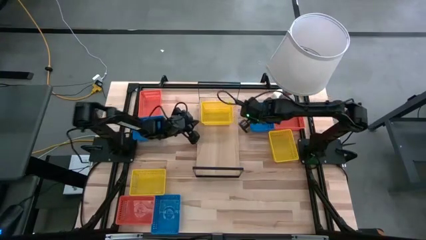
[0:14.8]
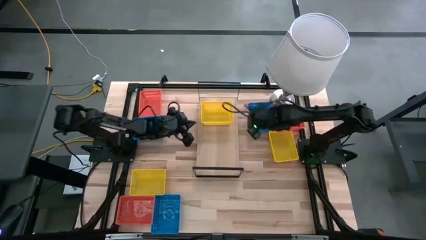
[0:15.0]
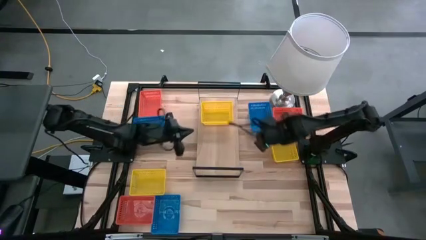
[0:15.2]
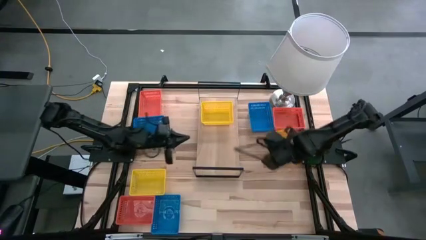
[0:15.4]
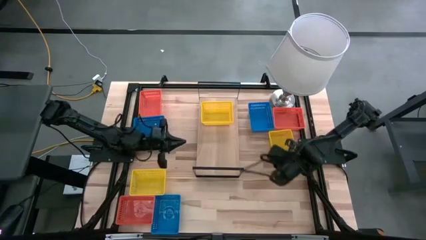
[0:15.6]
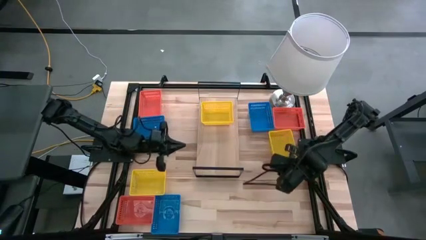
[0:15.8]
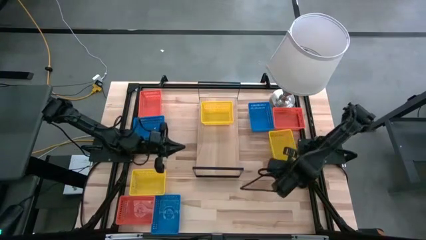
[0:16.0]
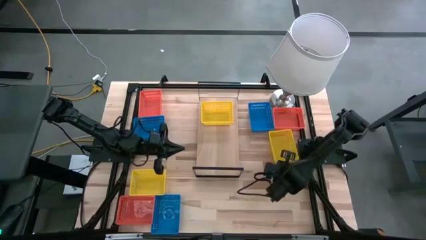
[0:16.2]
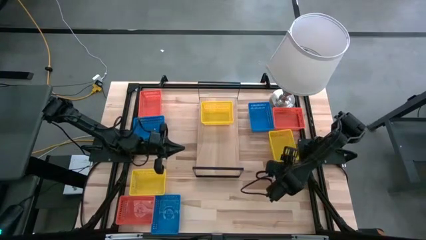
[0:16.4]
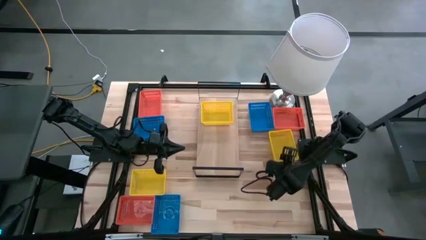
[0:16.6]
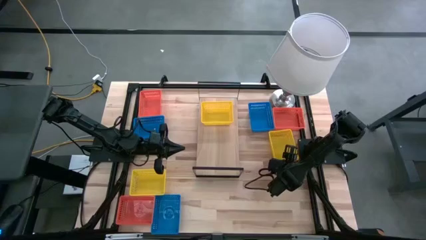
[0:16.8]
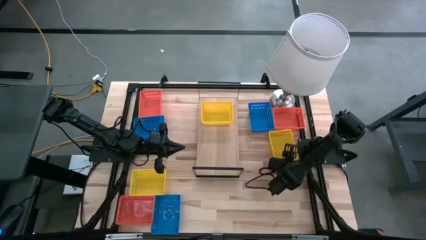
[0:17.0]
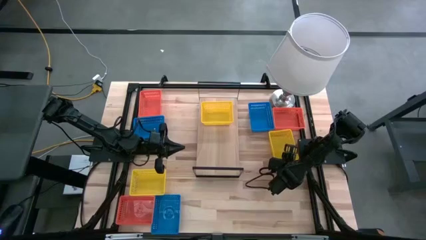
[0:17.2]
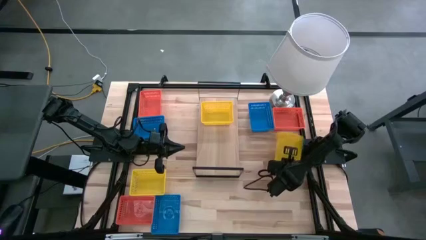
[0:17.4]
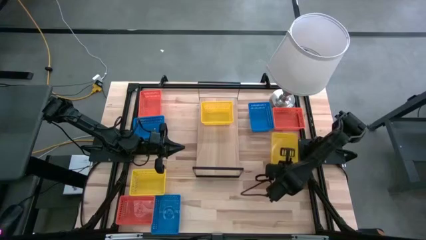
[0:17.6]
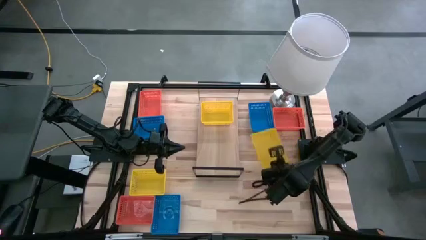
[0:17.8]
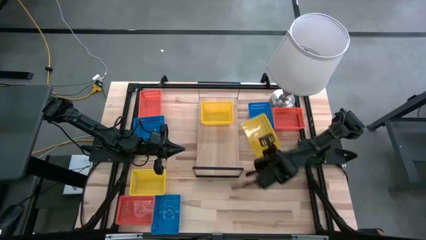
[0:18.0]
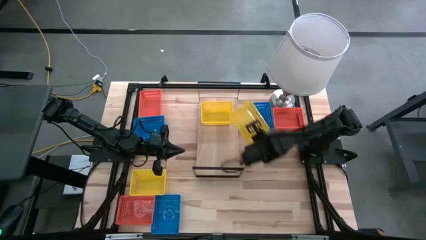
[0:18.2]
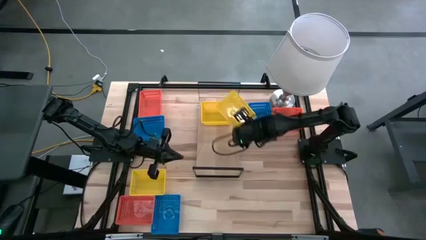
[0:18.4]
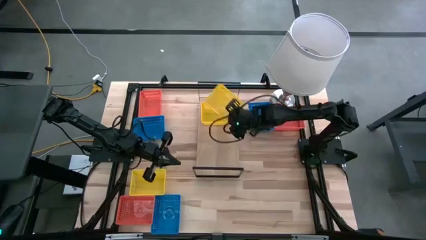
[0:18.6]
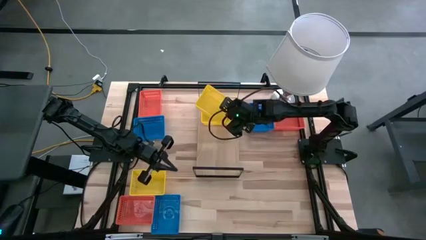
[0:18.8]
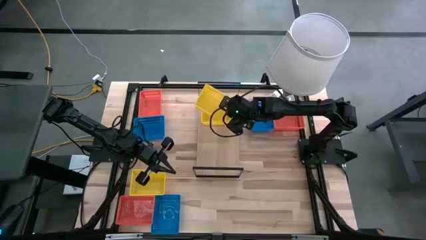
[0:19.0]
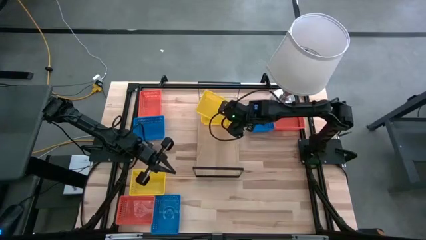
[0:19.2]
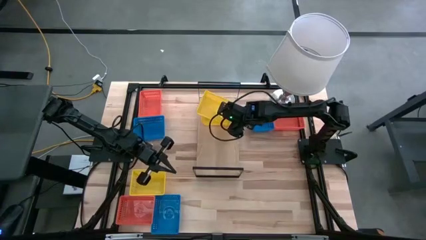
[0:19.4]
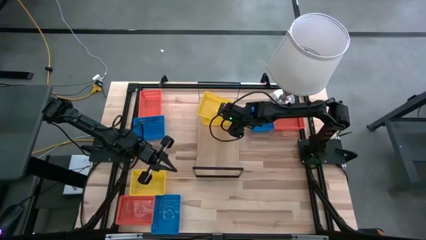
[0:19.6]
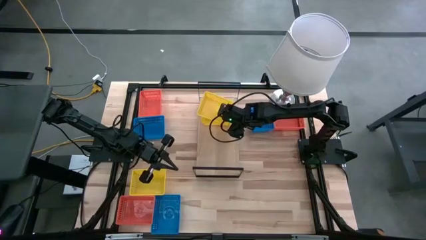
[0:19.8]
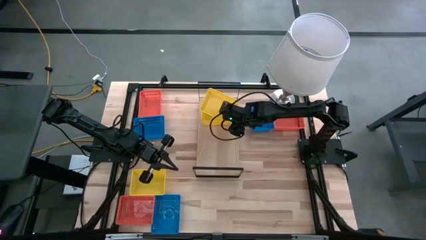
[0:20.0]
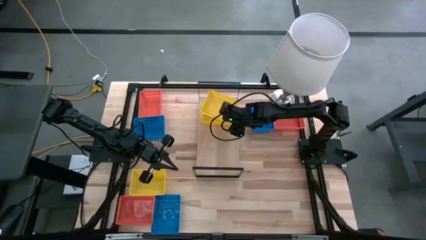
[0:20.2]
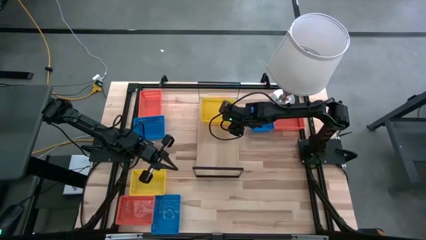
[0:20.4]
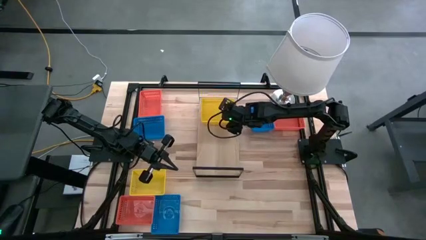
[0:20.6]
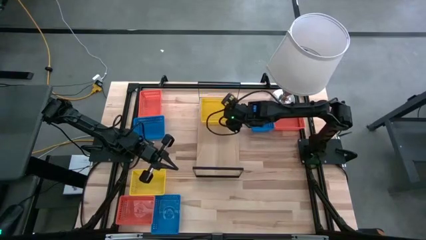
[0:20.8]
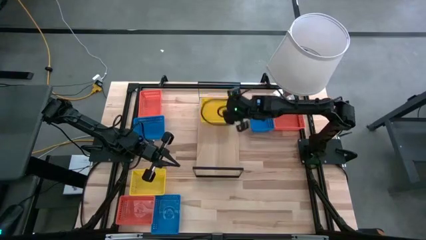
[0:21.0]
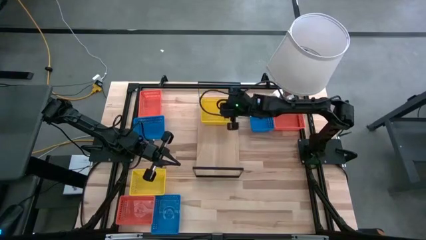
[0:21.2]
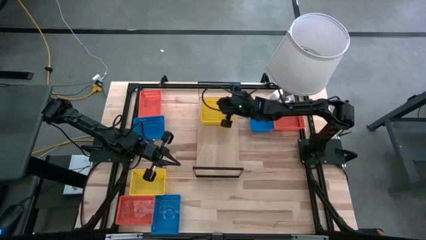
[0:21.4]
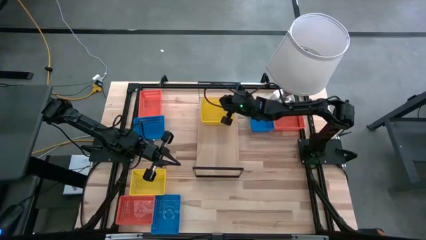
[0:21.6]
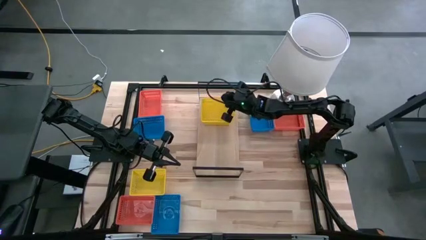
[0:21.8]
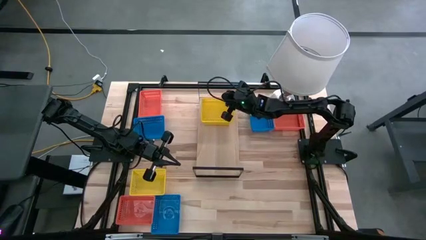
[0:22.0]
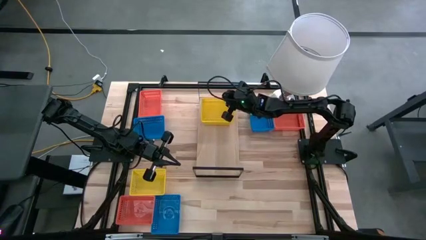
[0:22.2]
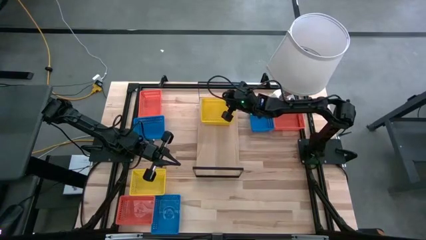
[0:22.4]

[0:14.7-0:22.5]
Task: Stack baskets on shelf by color
Stack the top yellow bin on top of the yellow bin on the shelf

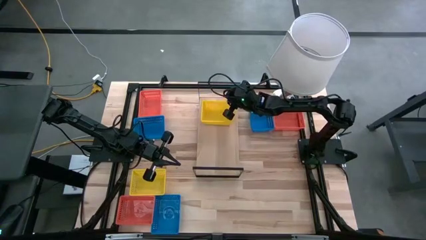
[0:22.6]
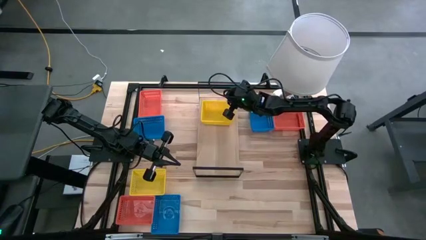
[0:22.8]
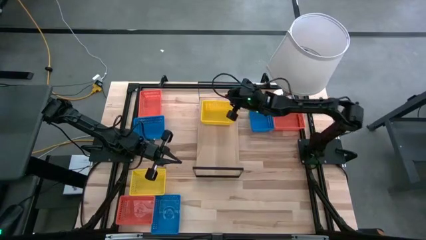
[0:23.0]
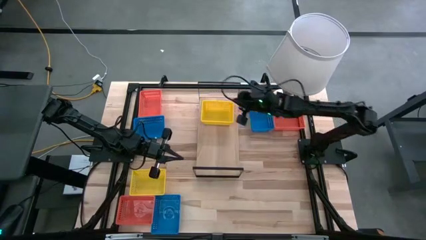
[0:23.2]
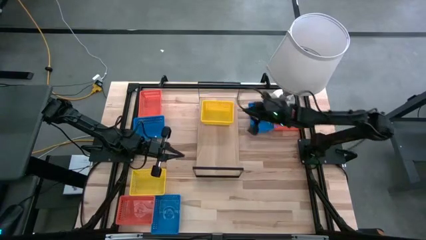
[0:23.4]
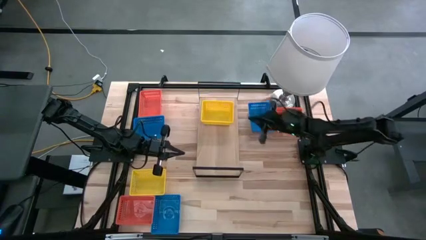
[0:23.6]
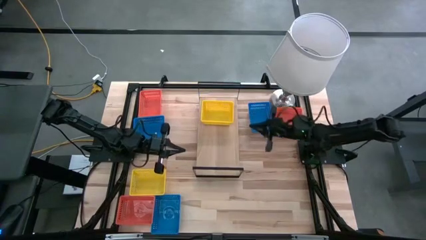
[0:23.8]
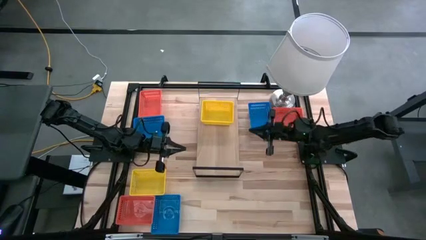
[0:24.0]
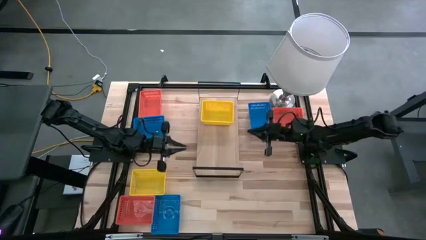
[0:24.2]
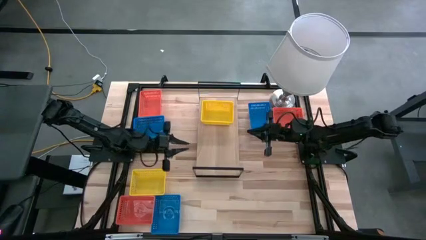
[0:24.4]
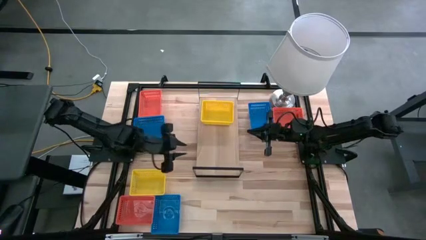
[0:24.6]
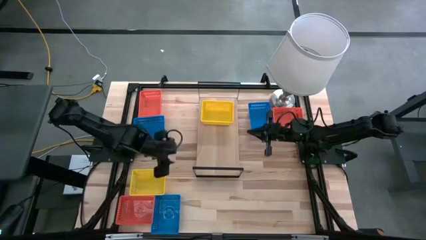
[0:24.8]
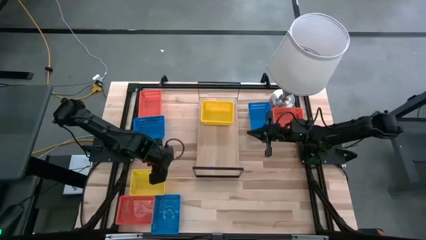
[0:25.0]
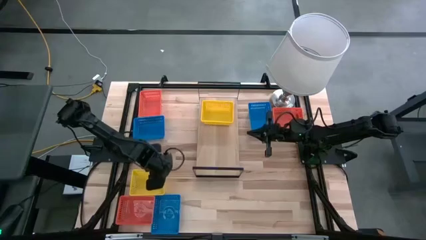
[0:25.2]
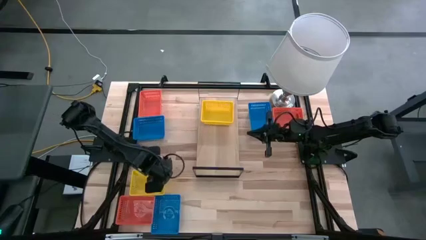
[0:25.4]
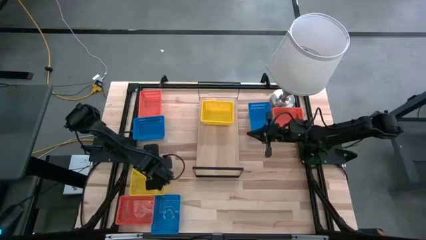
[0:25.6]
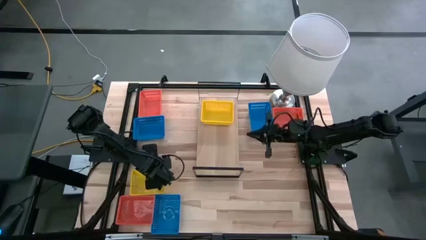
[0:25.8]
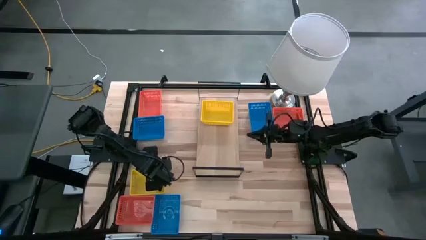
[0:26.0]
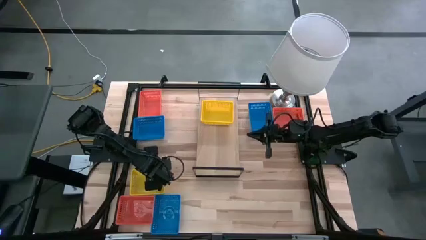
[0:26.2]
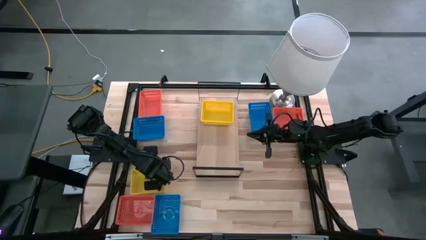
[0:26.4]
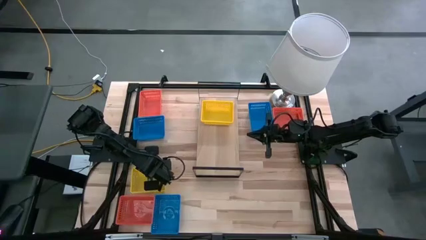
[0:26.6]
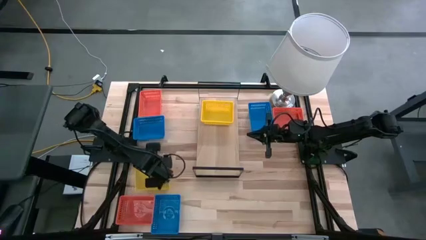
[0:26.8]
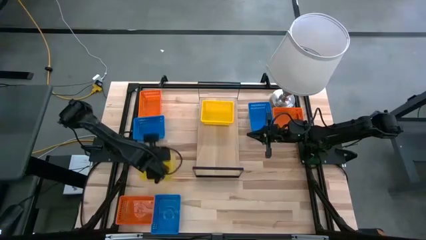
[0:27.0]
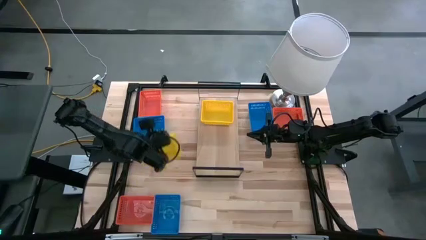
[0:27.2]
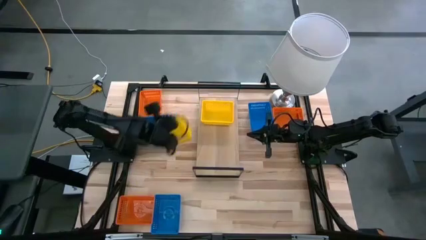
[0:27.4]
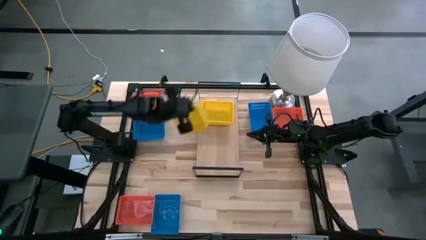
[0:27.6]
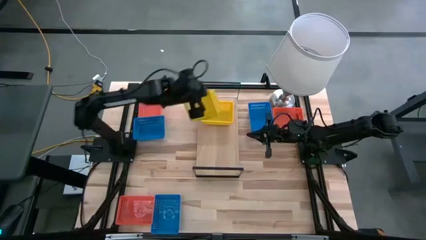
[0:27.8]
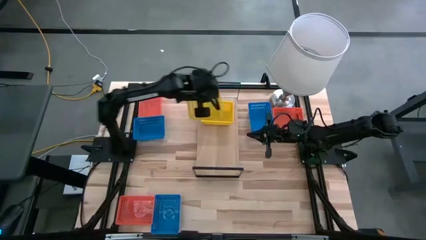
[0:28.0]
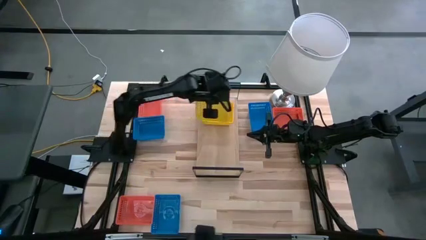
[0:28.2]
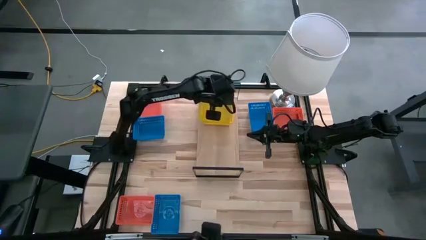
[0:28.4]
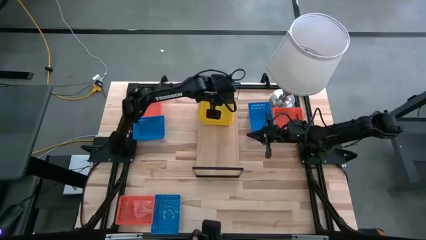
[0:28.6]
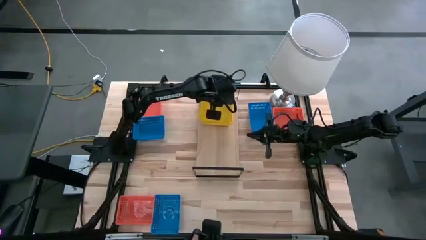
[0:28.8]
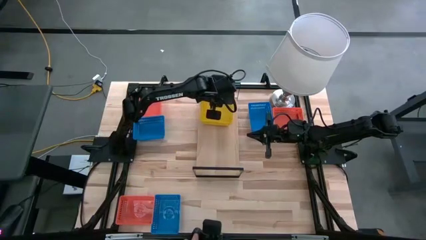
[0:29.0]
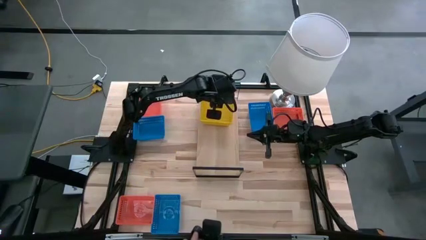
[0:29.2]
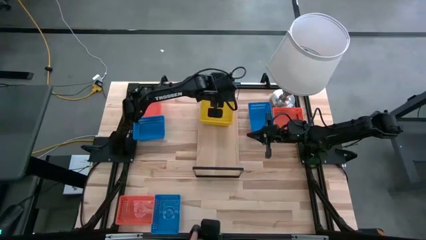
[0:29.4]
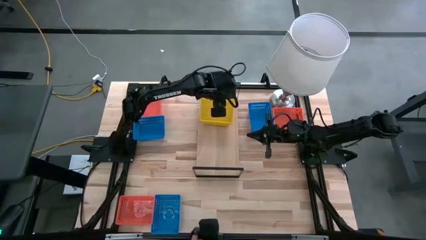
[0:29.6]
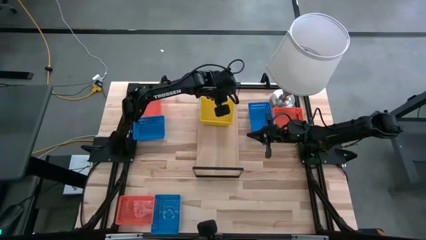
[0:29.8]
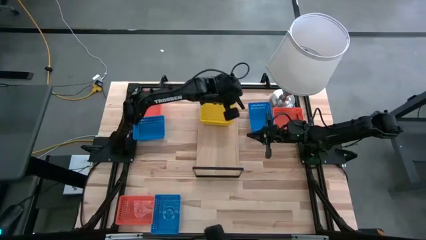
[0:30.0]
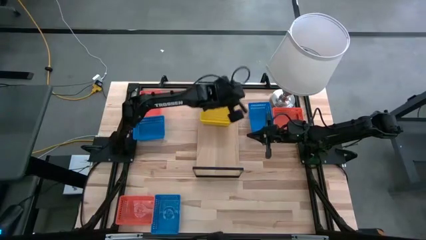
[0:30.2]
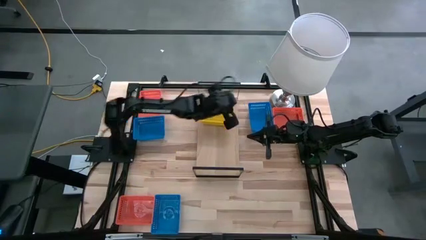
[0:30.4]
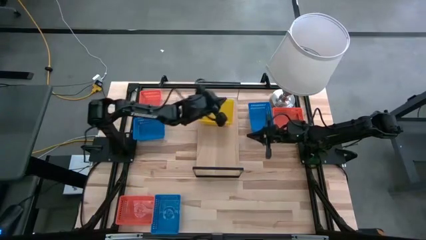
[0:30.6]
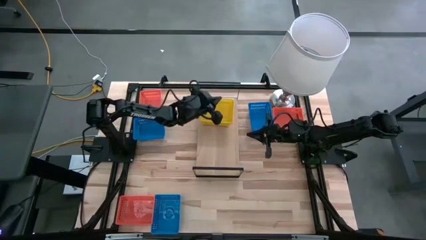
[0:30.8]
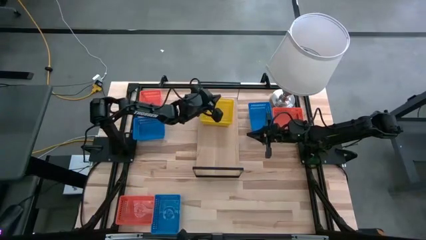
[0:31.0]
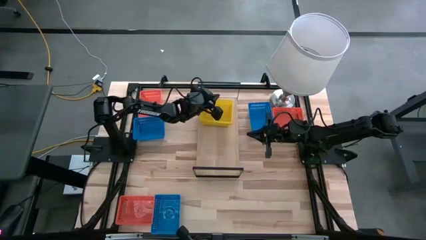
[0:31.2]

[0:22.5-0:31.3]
Stack the yellow bin on top of the yellow bin on the shelf
